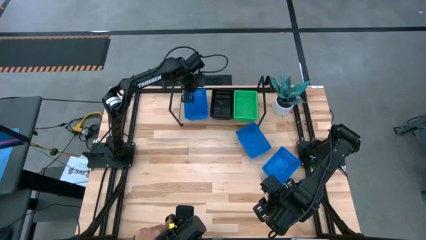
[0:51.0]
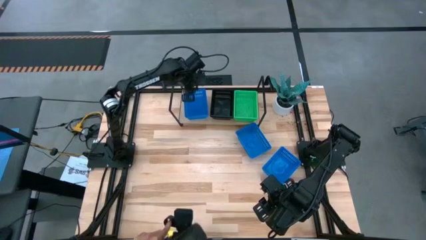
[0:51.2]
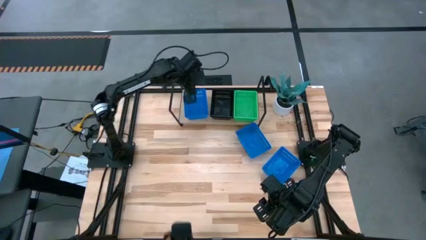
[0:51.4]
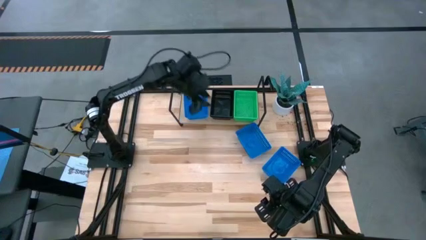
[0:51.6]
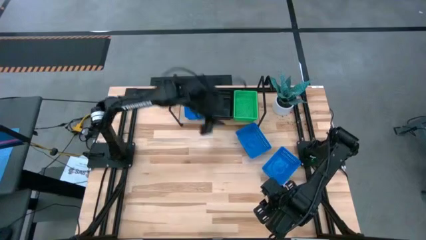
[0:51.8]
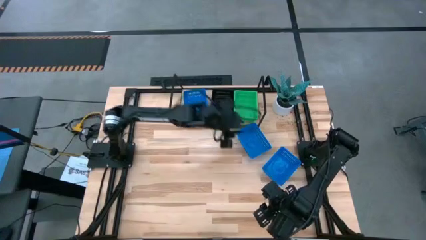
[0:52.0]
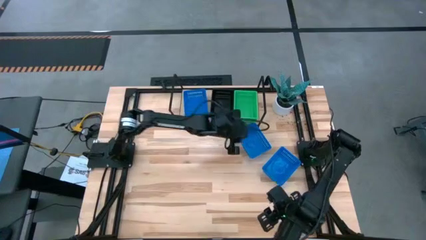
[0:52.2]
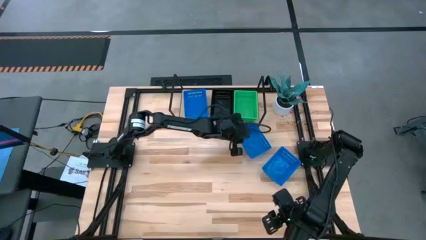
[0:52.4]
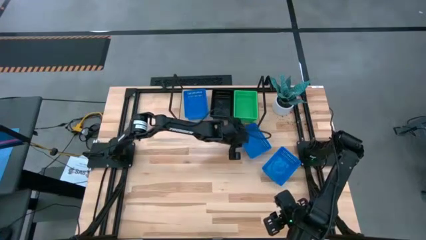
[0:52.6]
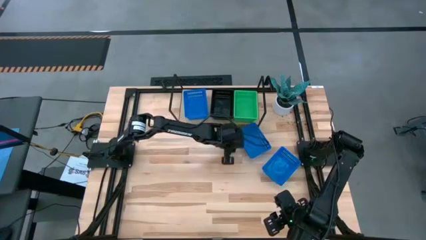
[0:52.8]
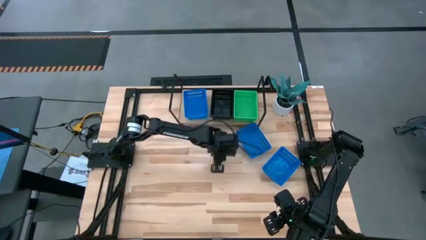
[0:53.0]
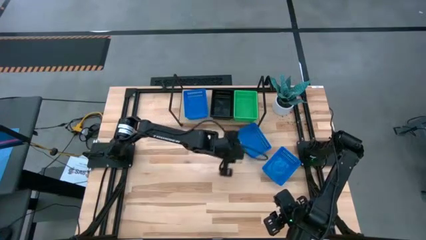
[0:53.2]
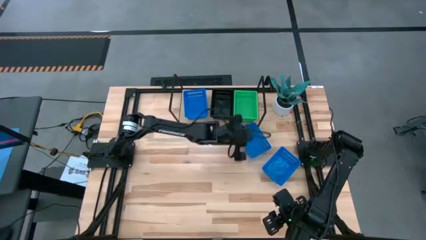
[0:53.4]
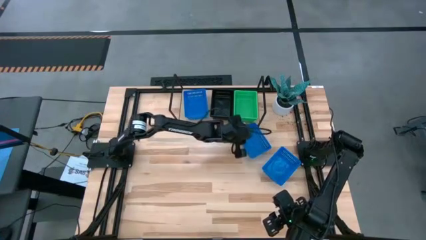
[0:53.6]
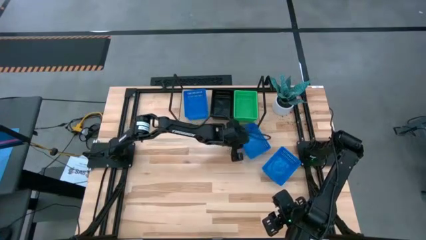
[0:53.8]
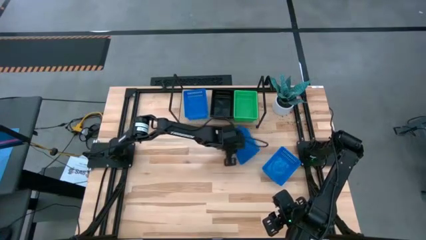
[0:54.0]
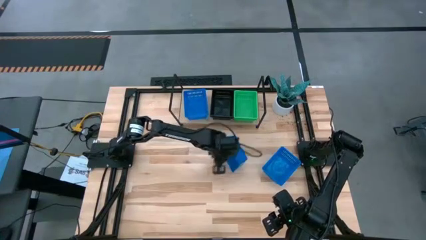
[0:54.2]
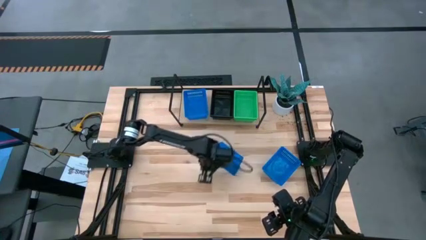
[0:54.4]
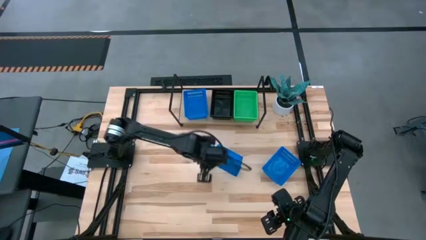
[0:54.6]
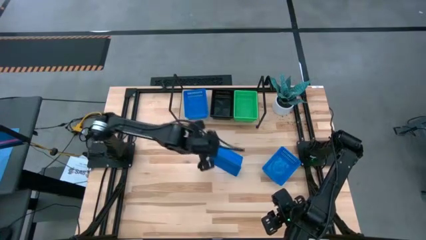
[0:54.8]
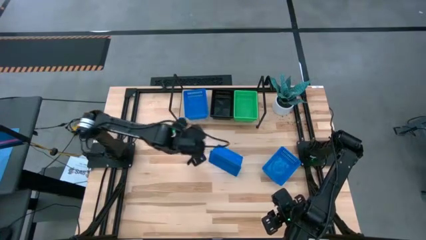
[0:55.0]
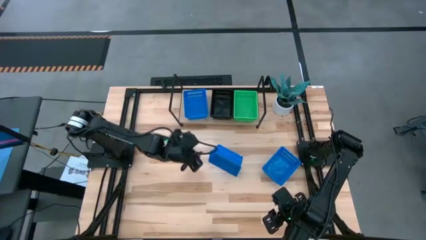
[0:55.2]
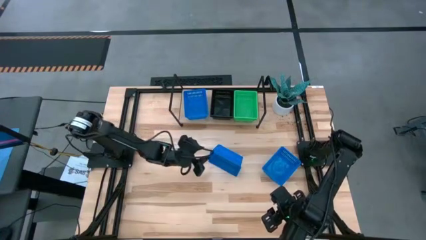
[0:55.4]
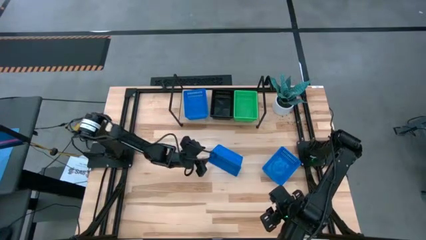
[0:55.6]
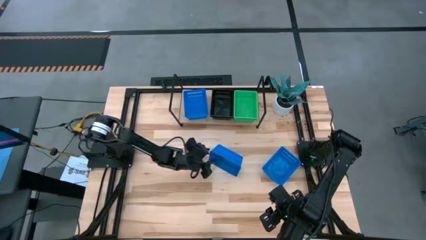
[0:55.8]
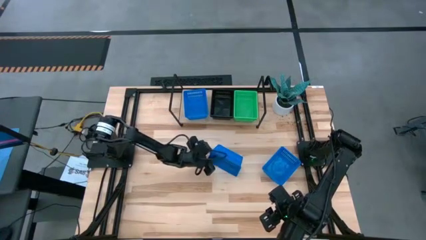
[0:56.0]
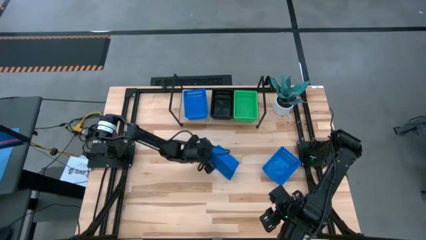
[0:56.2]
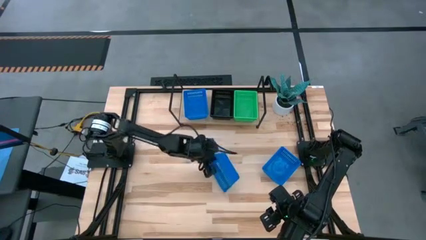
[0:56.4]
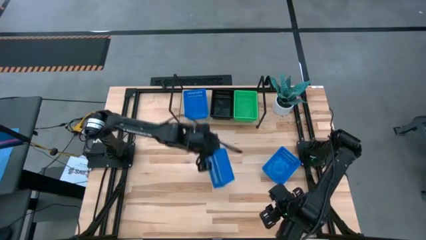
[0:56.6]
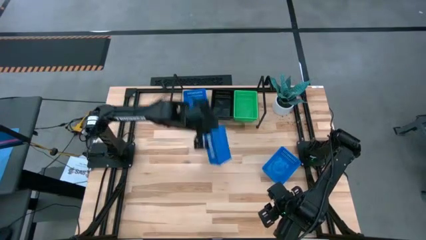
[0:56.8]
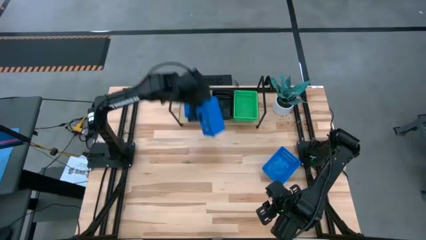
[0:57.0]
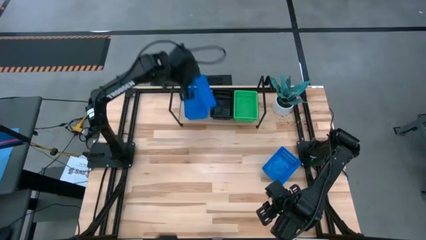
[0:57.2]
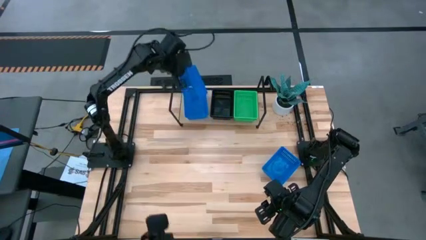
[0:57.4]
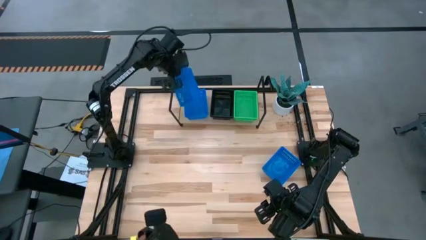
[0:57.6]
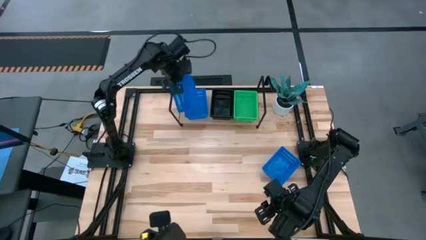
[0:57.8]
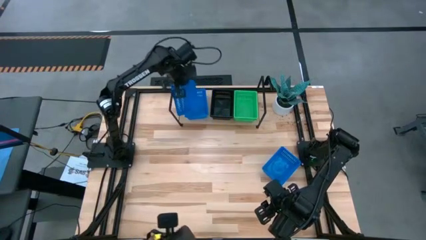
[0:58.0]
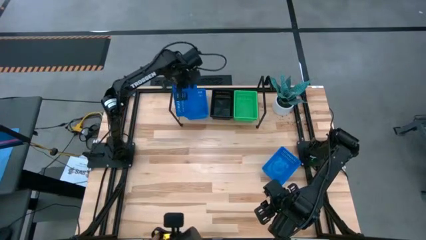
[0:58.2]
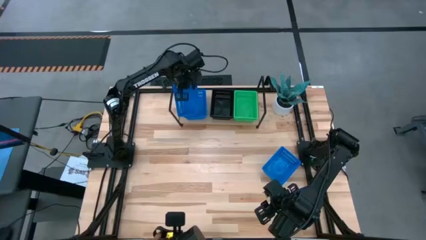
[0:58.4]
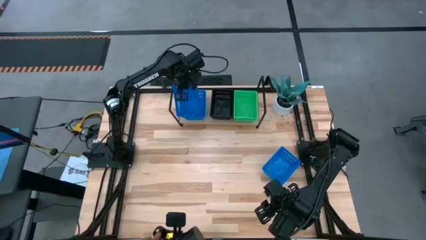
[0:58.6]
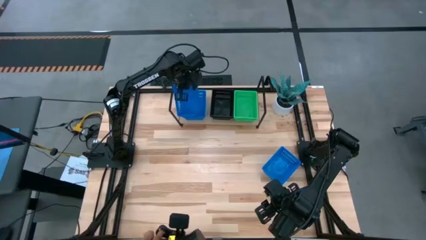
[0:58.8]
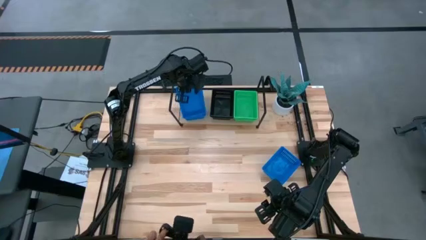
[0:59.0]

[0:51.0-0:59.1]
Task: Stack baskets on shelf by color
Stack the left blue bin on top of the other blue bin on the shelf

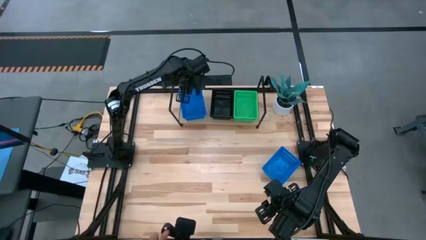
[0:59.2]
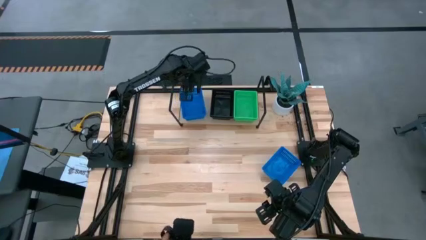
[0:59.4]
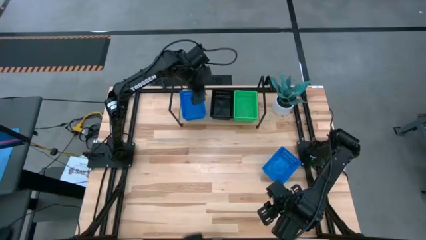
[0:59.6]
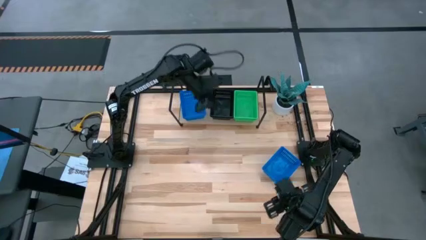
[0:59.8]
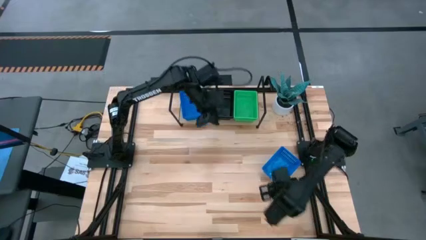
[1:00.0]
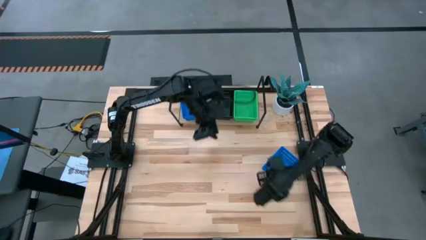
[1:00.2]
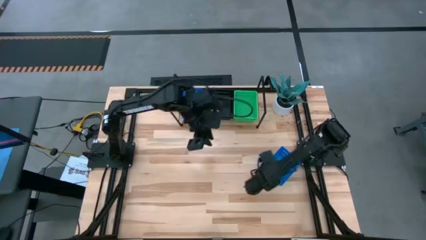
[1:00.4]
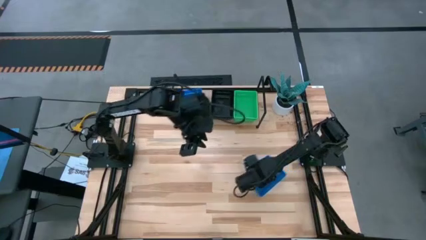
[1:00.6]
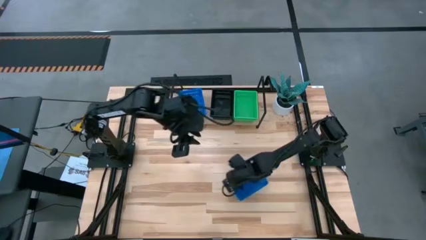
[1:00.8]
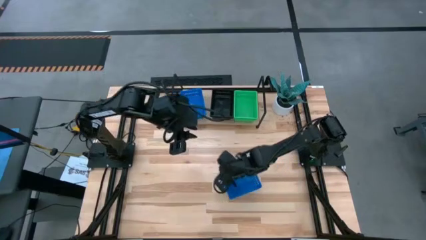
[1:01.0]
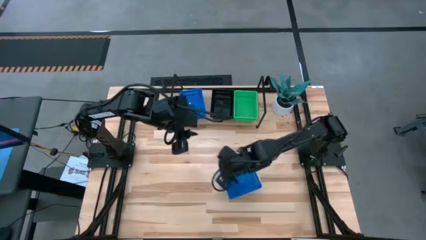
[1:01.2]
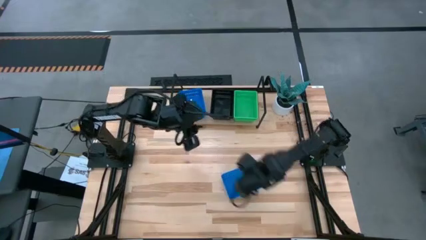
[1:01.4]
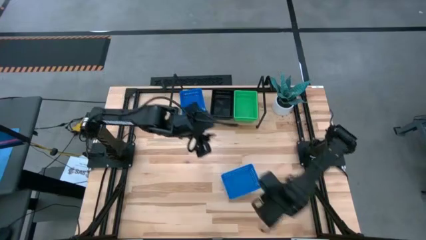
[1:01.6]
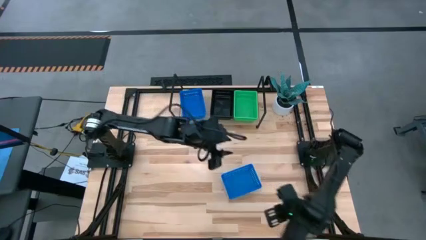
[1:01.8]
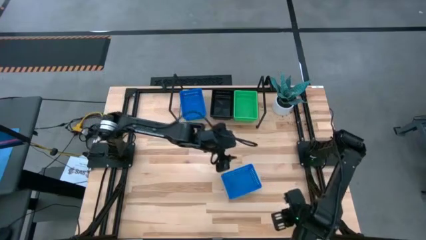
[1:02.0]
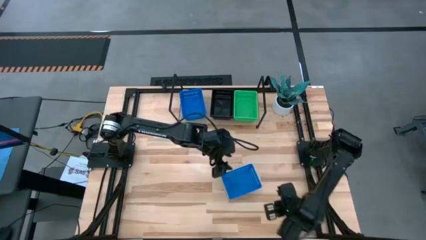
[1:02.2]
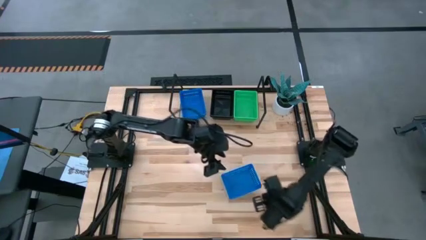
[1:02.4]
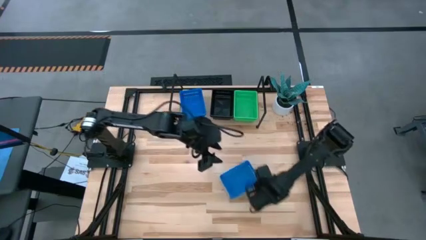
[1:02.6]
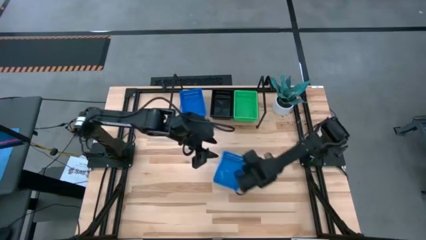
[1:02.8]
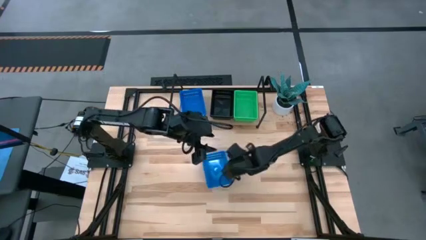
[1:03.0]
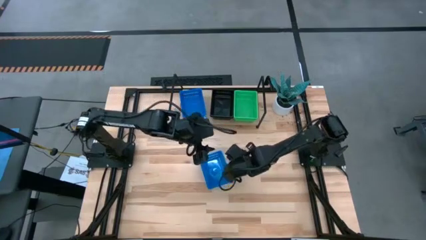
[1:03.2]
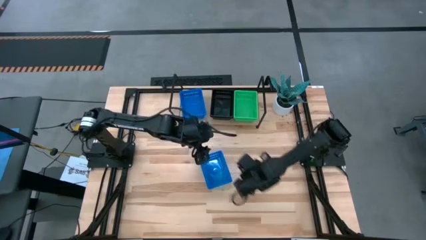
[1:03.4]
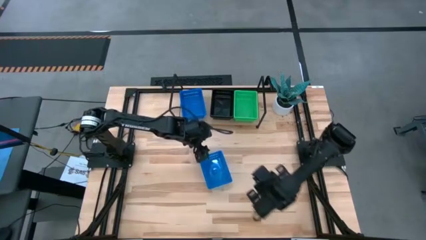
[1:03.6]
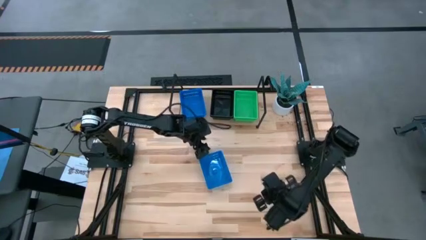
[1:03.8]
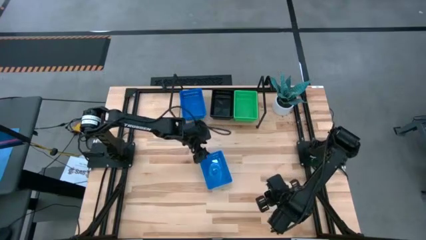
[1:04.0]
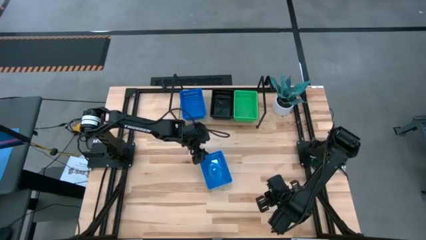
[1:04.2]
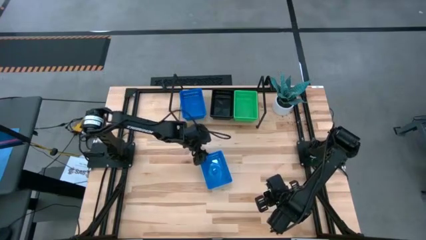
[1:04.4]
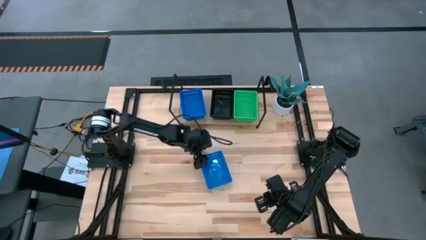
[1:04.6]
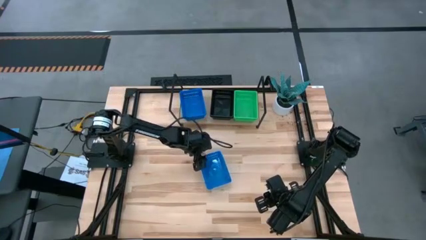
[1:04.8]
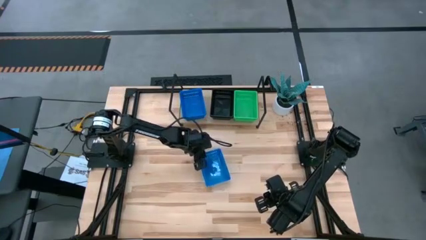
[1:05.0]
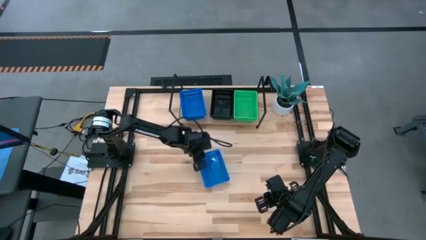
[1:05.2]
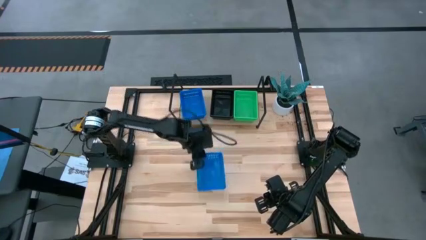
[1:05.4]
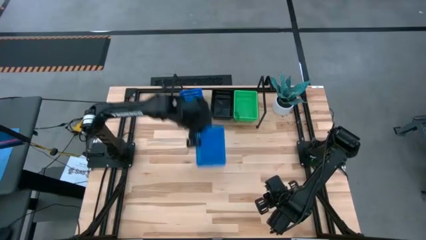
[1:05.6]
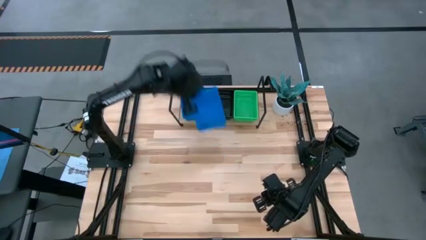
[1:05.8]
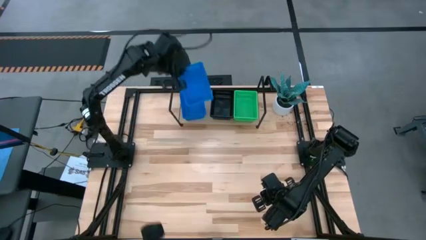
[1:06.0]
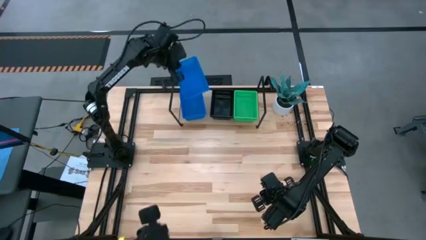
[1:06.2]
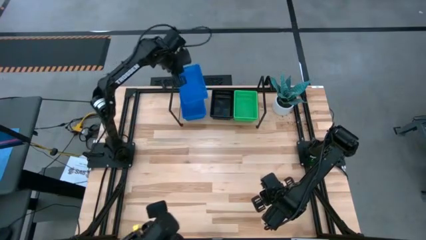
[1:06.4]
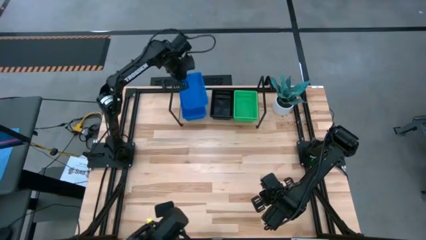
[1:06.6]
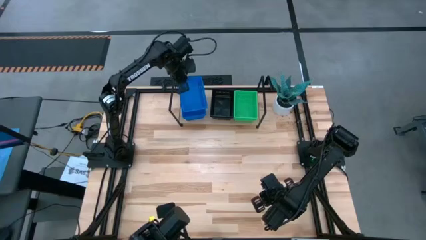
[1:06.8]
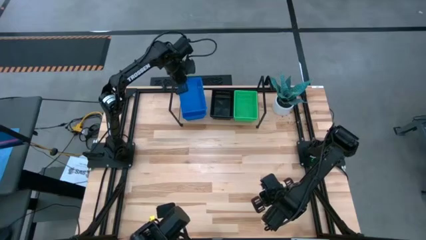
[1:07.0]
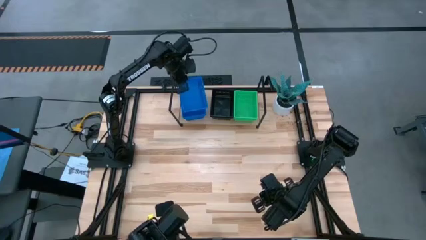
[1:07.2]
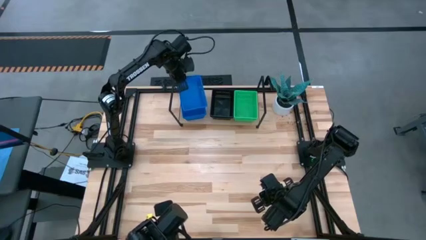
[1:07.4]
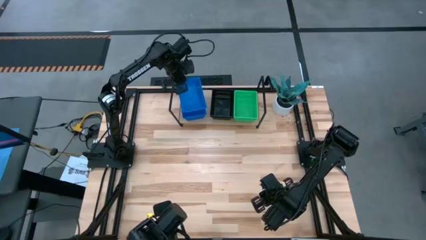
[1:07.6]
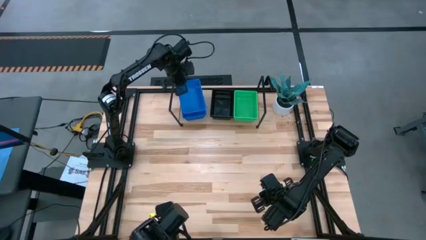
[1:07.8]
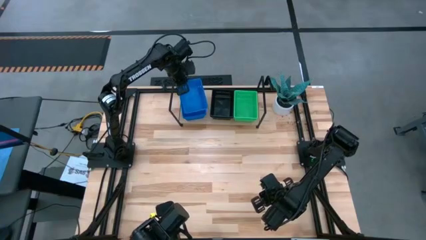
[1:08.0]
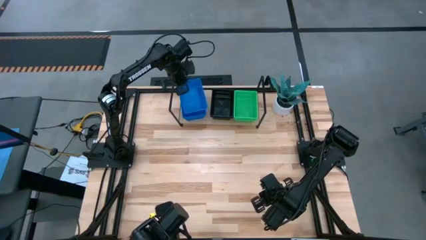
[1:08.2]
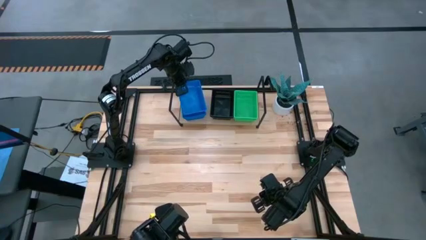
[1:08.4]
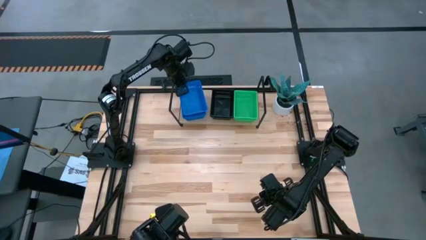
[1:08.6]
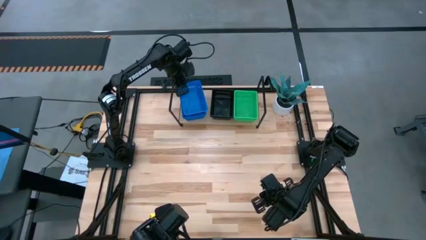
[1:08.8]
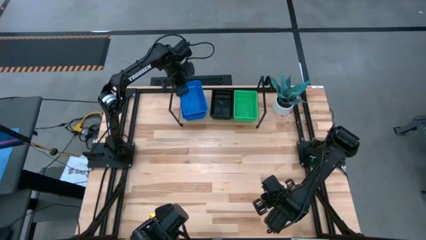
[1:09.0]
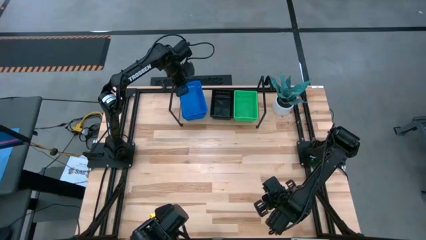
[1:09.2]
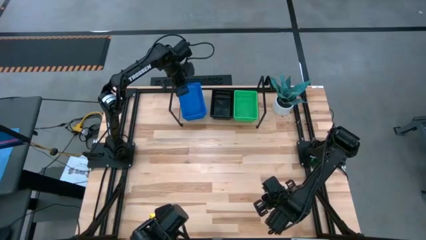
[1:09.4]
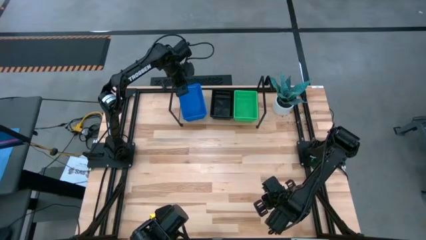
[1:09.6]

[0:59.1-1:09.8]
Stack the blue bin on top of the other blue bin on the shelf
